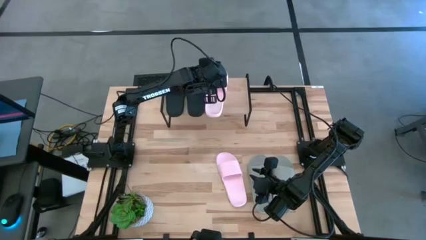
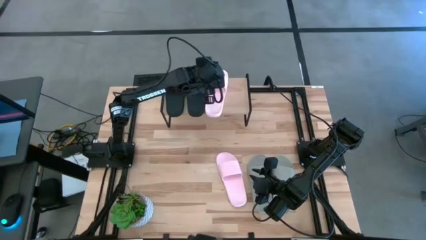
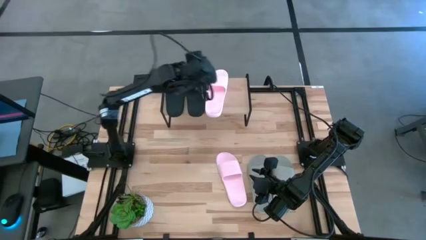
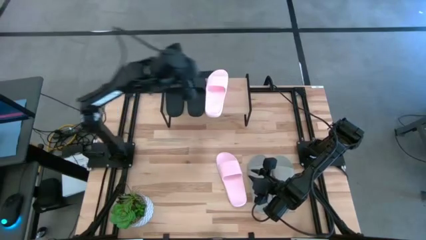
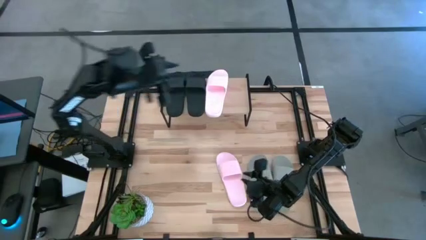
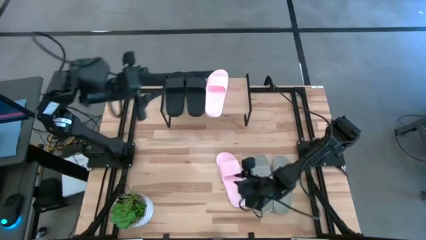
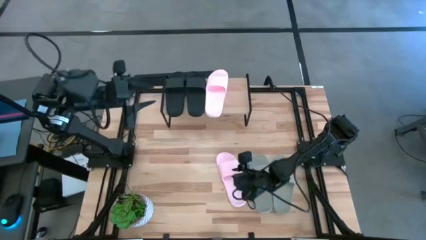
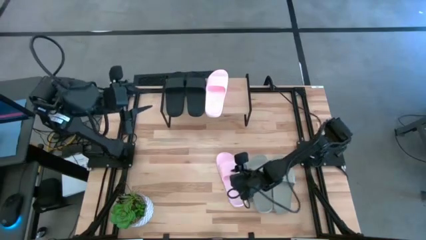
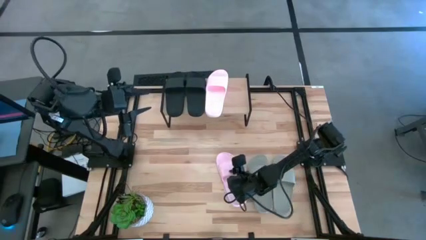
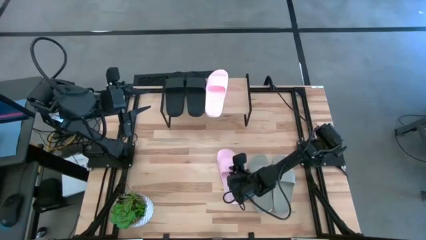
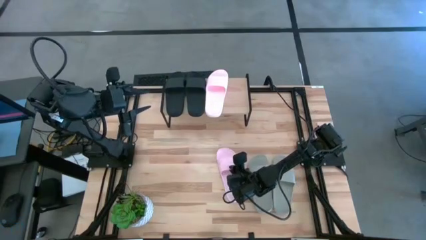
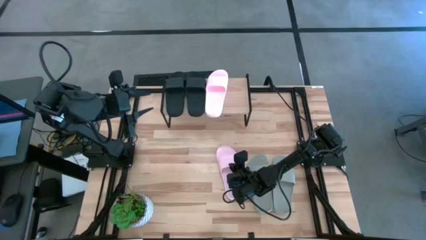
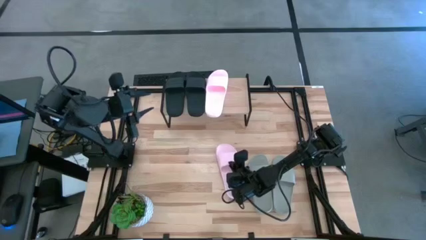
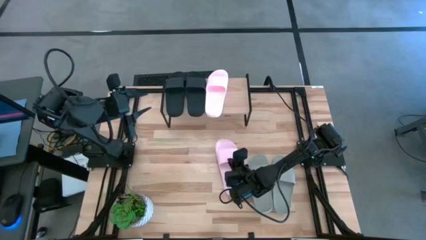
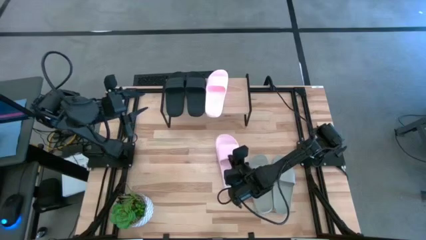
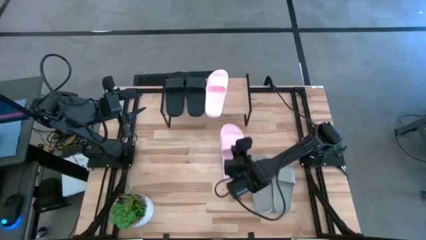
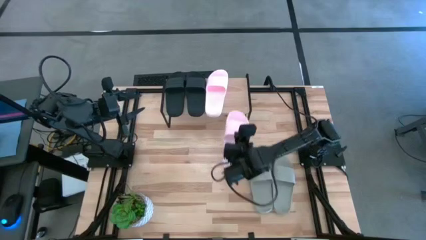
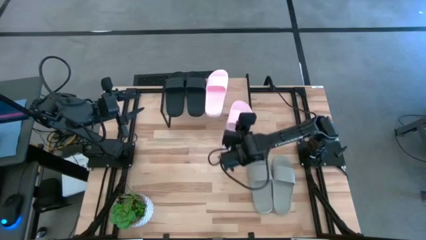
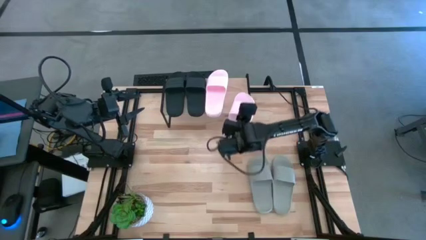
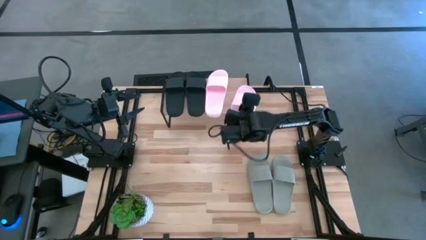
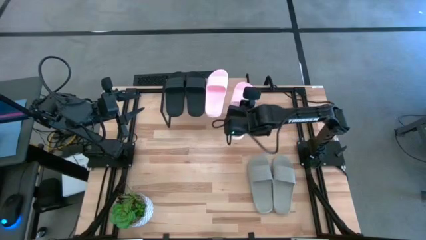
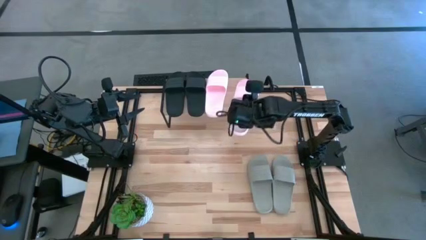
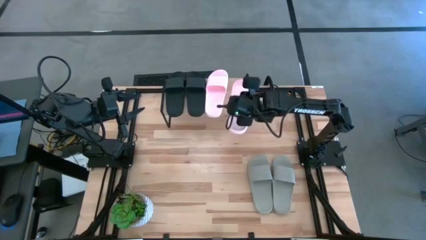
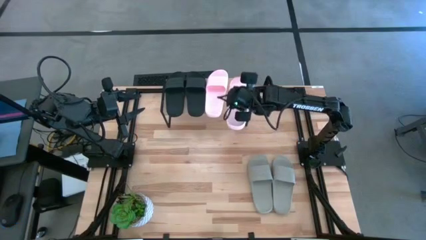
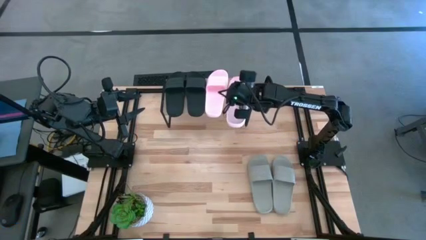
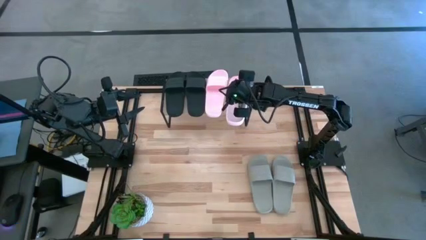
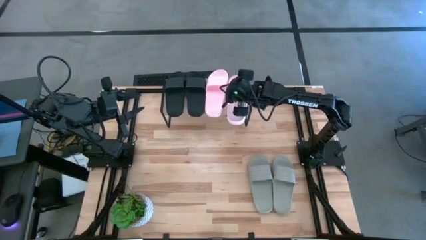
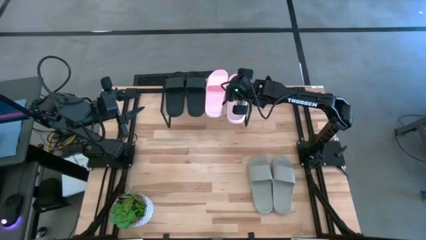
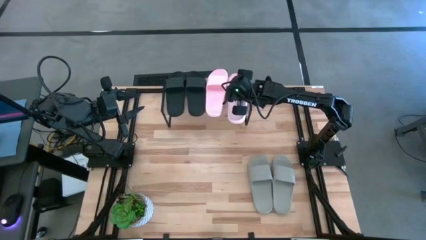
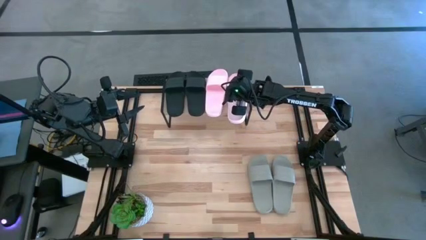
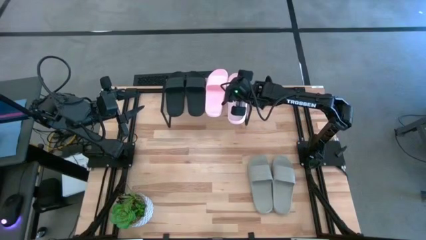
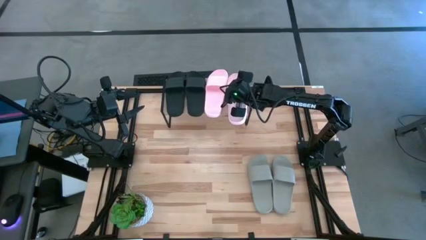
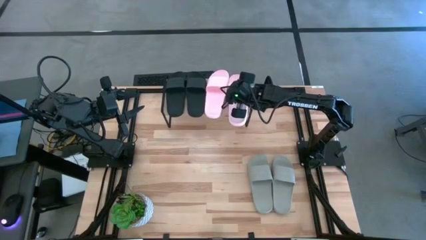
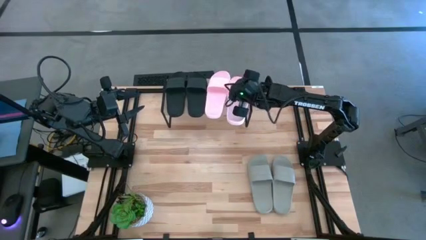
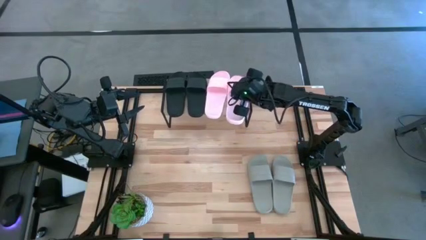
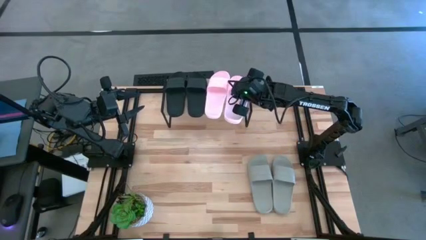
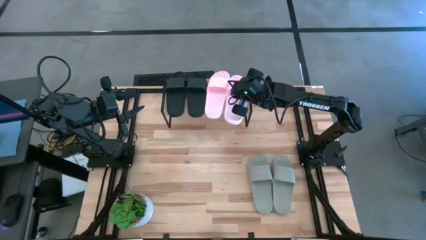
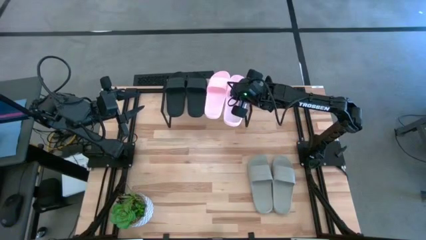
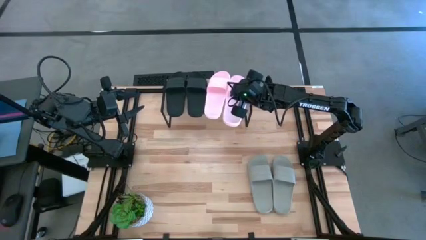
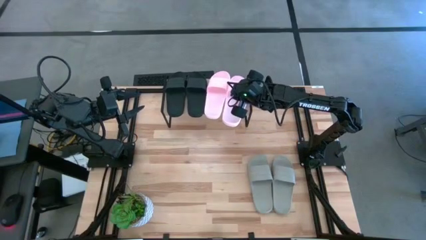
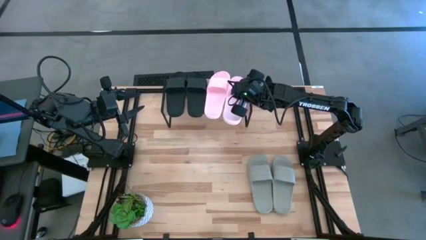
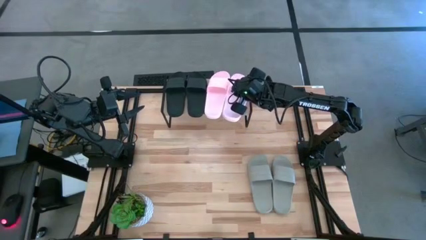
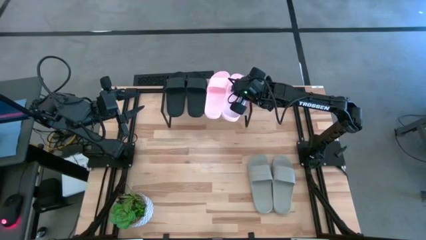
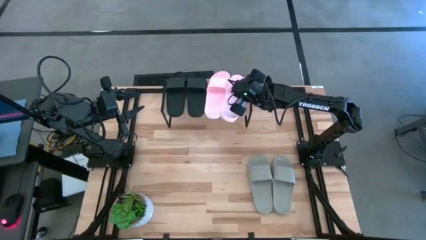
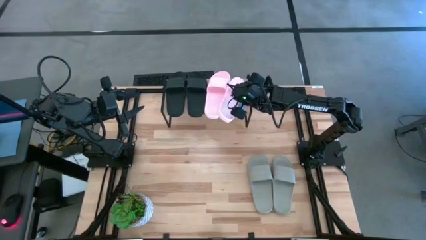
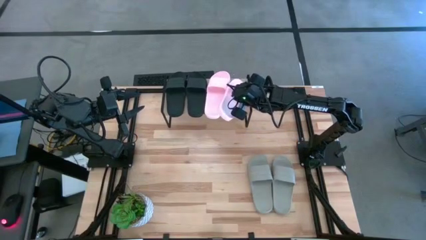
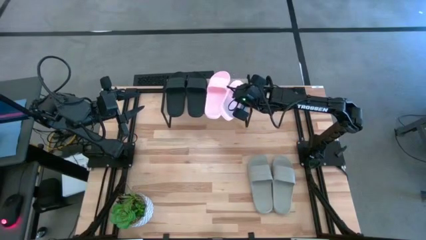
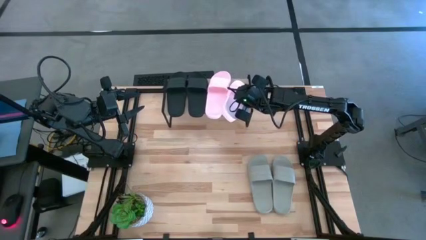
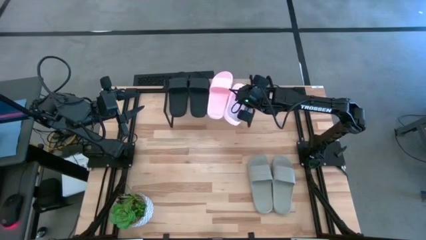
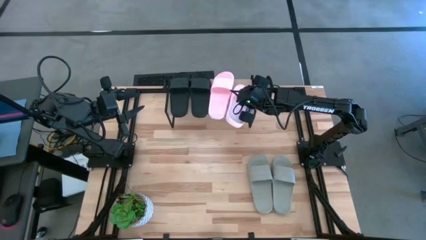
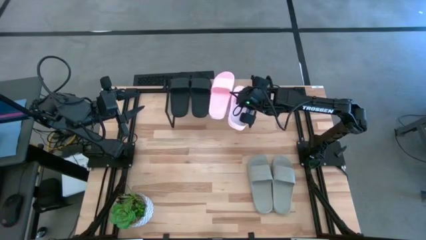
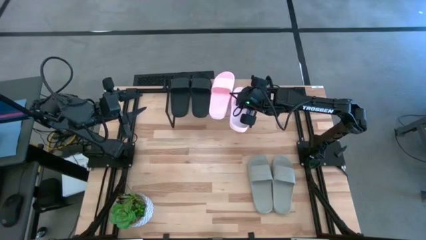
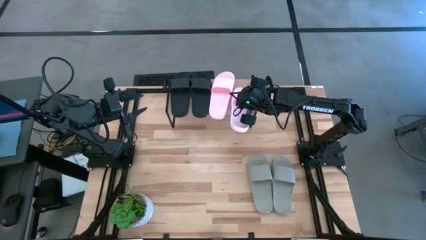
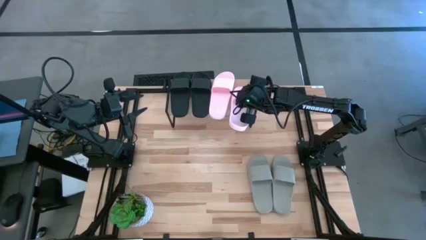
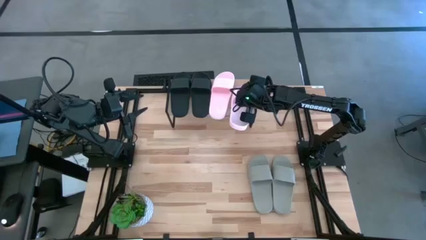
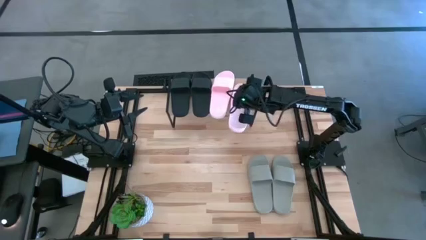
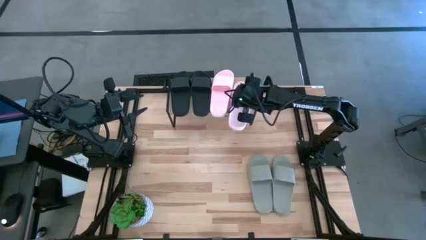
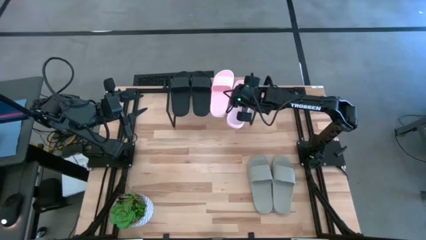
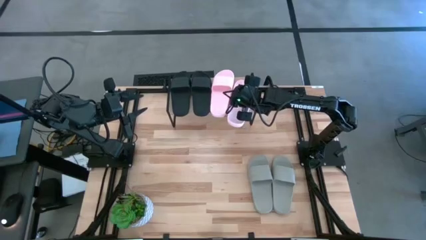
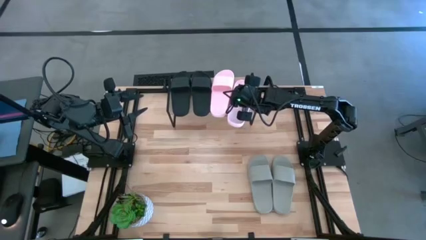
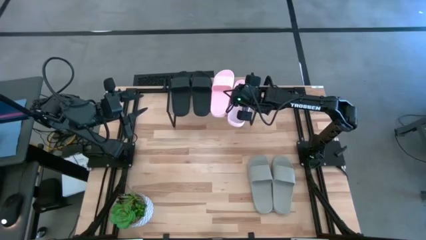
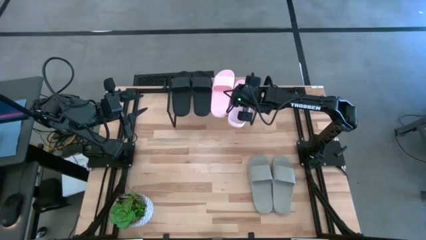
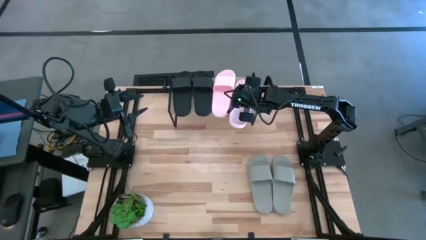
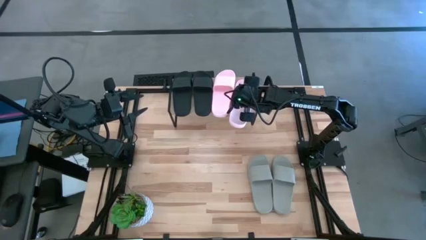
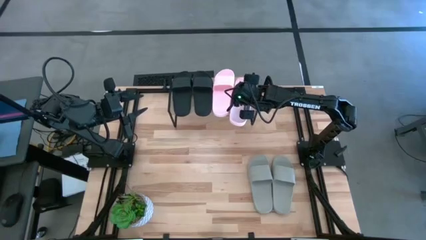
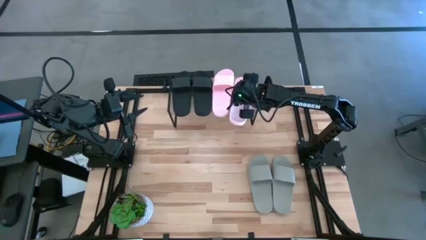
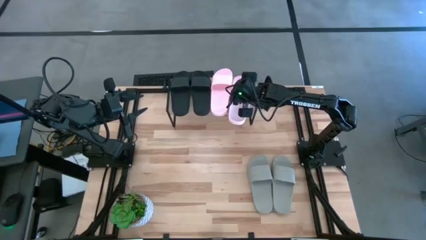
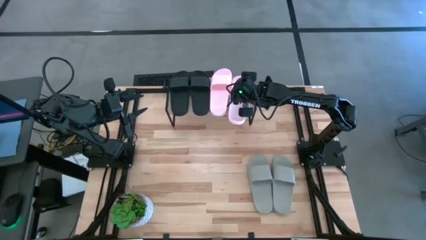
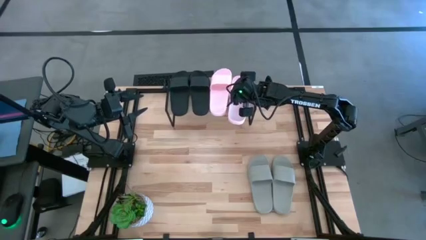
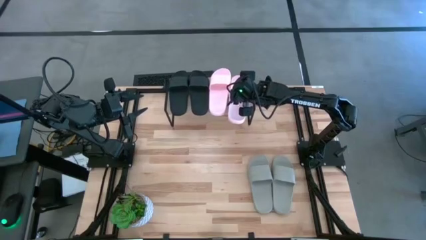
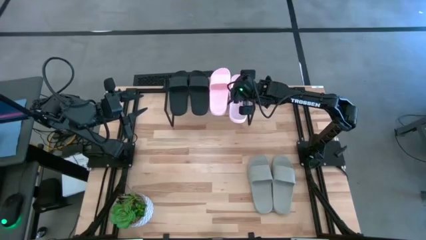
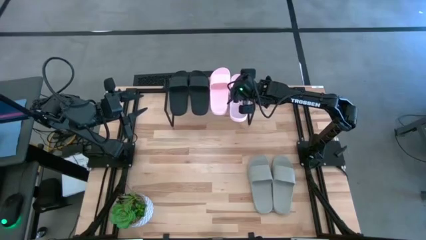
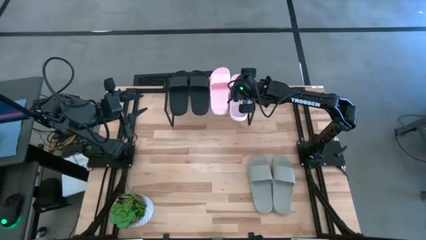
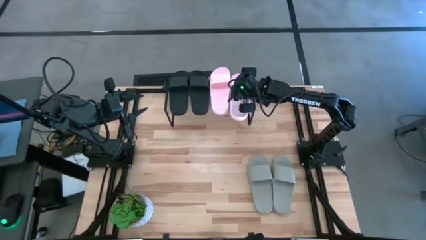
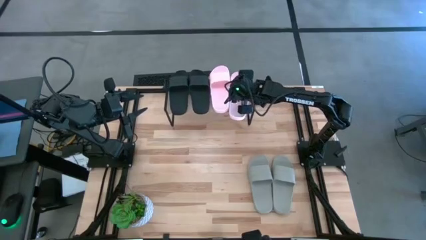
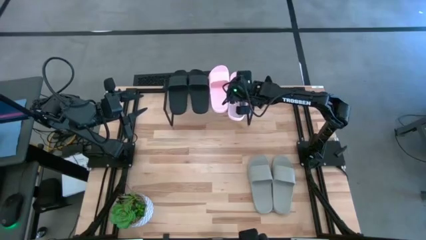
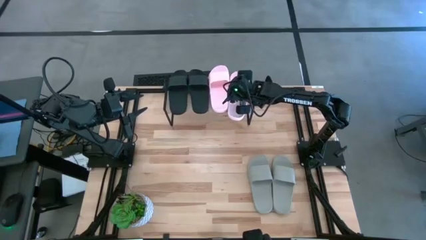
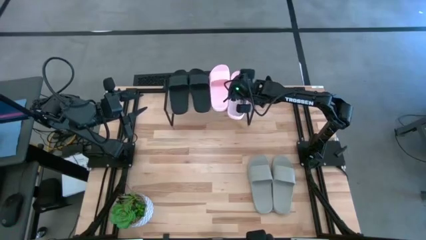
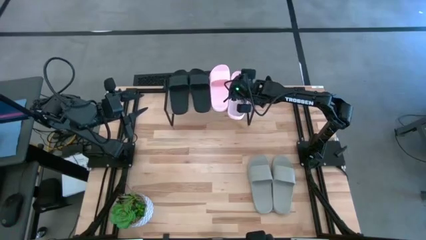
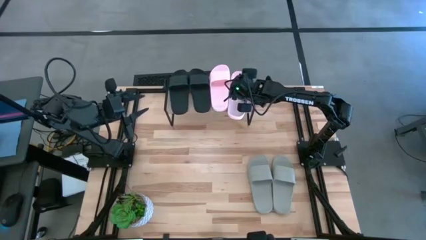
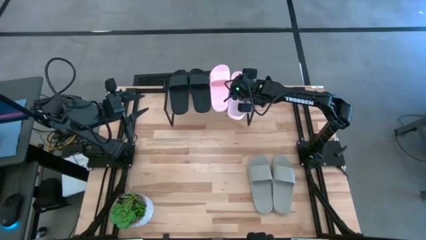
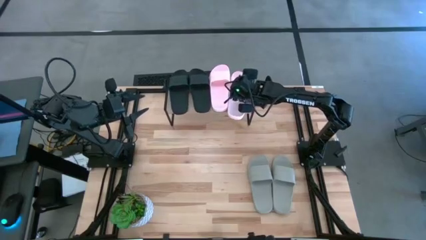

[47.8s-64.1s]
Task: Pick and place slides into the shelf
Put the pink slide on the shelf
